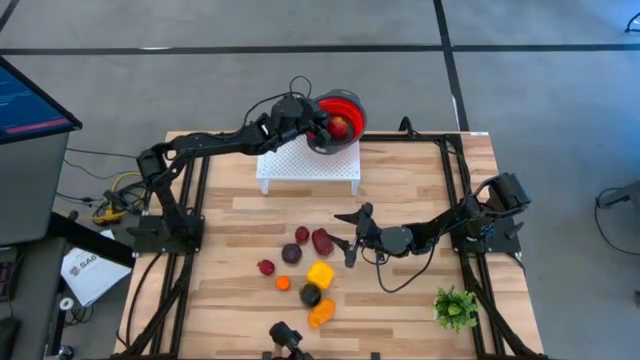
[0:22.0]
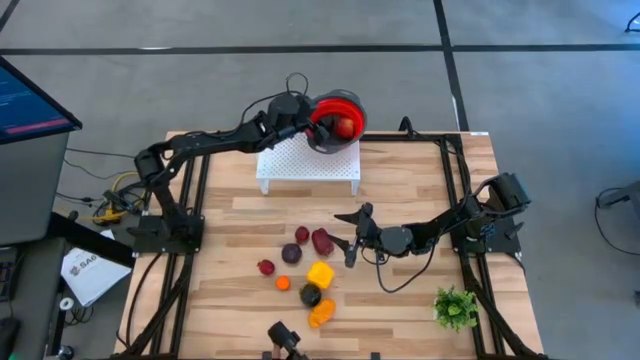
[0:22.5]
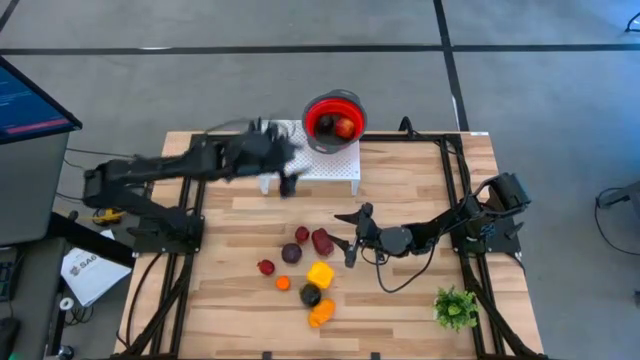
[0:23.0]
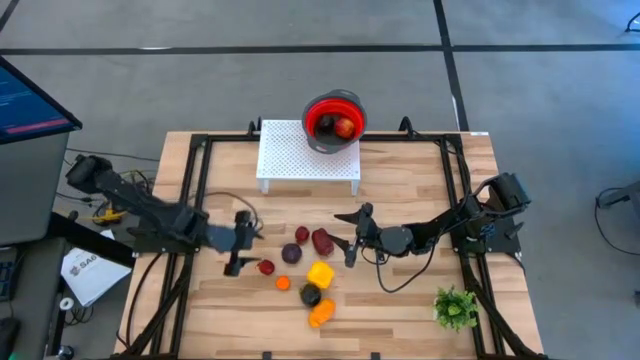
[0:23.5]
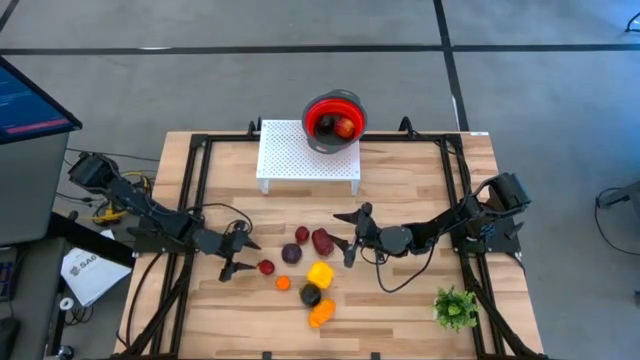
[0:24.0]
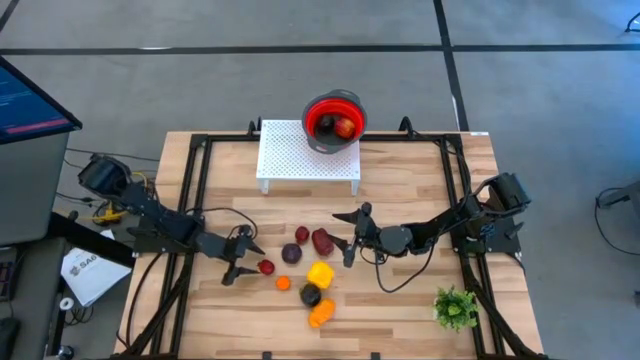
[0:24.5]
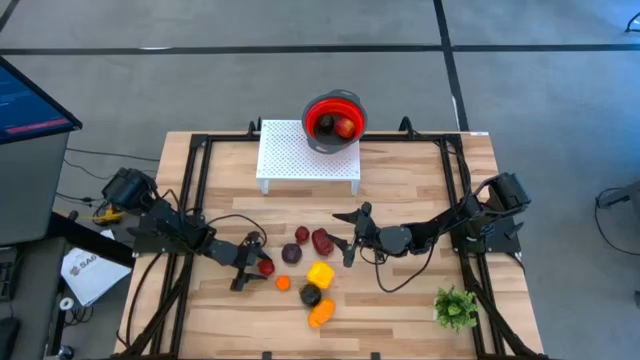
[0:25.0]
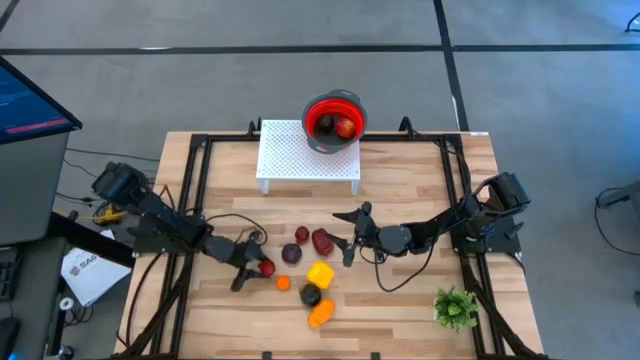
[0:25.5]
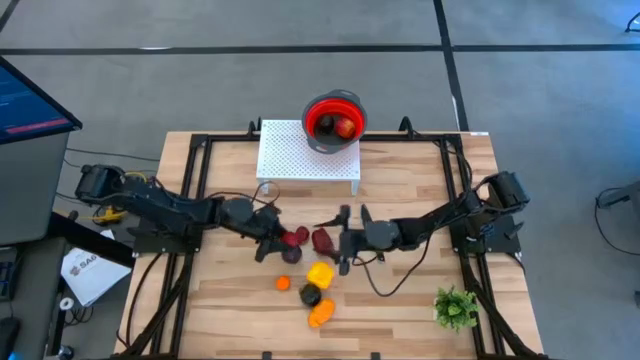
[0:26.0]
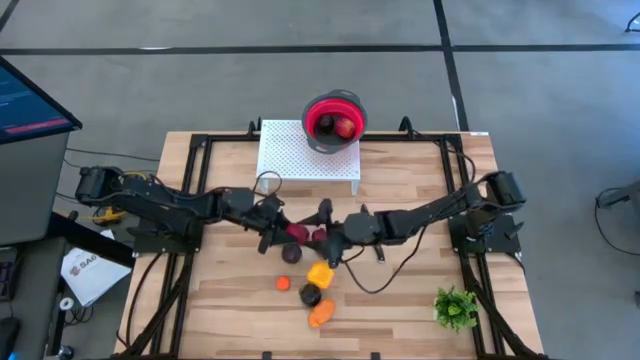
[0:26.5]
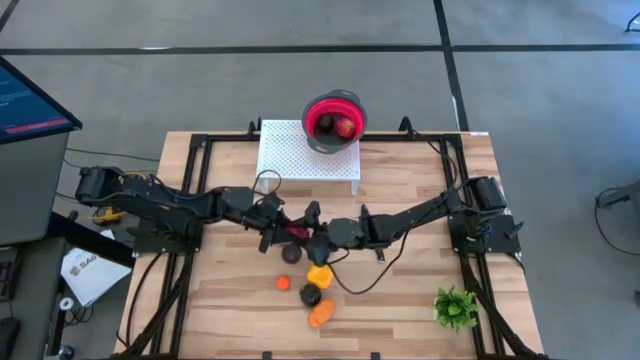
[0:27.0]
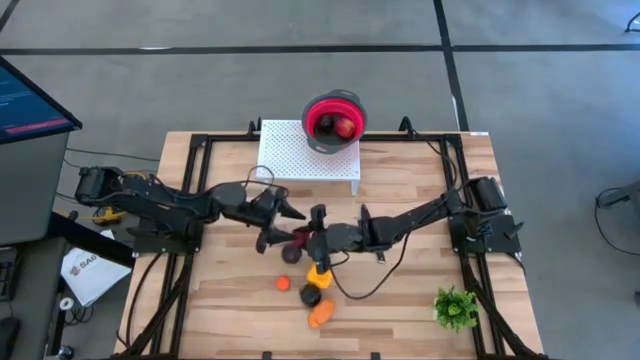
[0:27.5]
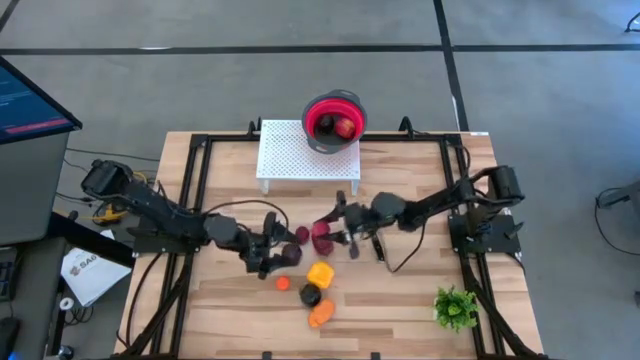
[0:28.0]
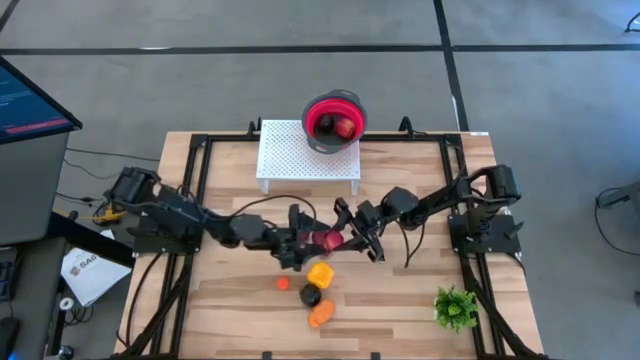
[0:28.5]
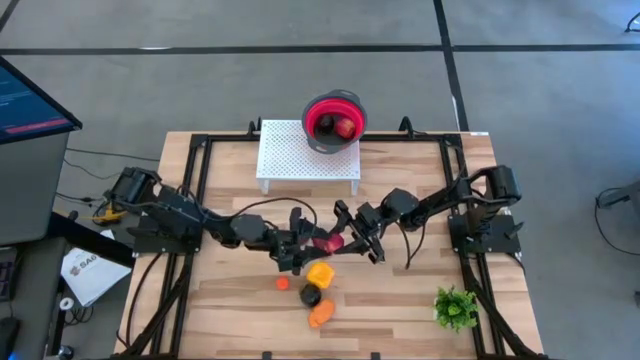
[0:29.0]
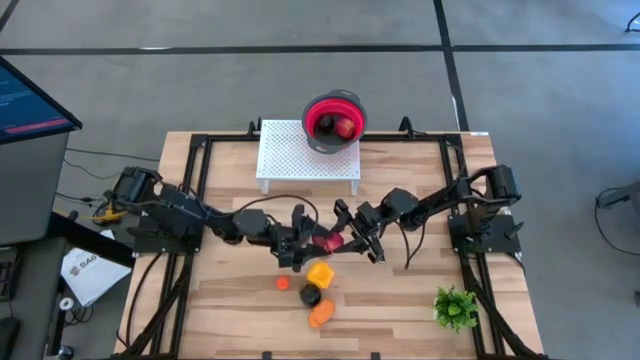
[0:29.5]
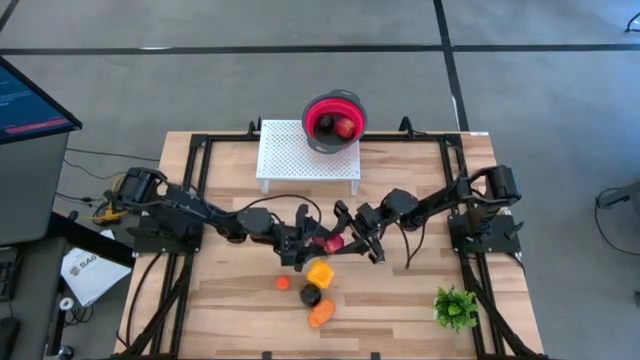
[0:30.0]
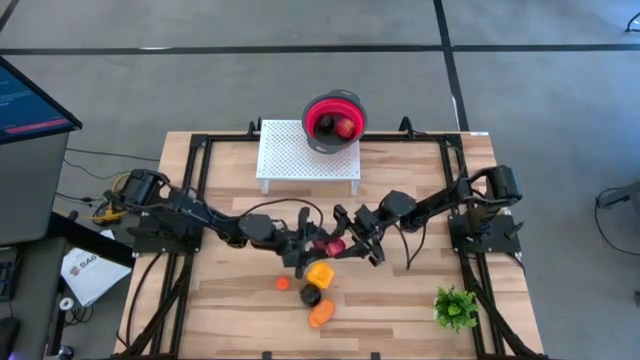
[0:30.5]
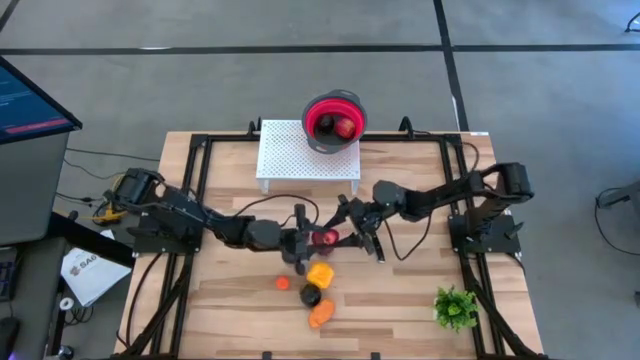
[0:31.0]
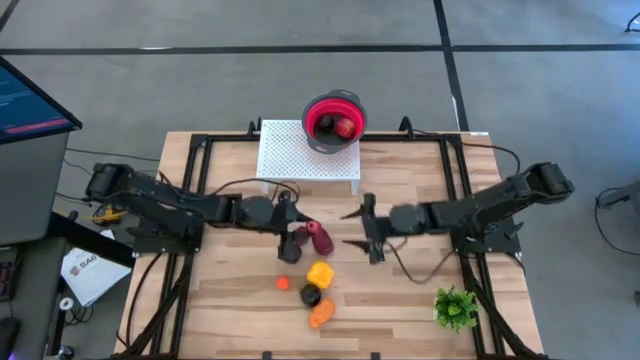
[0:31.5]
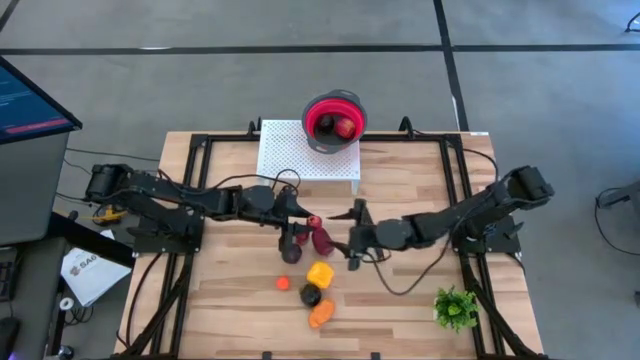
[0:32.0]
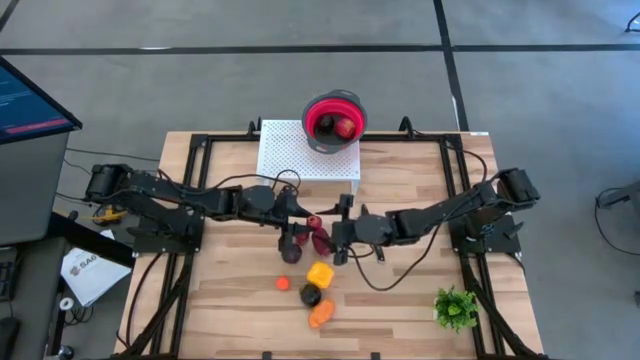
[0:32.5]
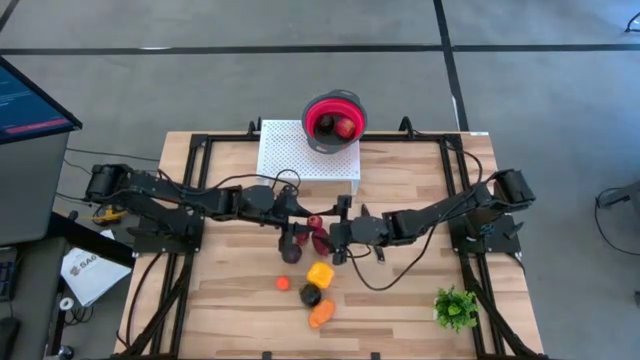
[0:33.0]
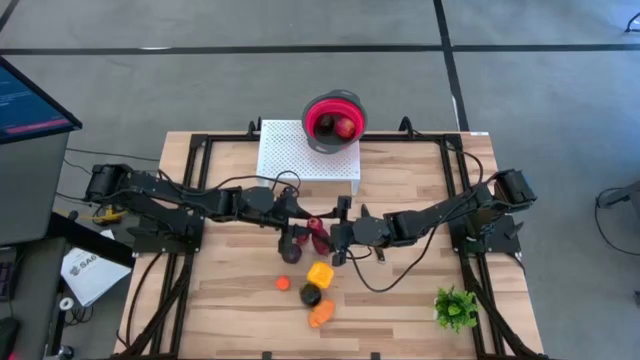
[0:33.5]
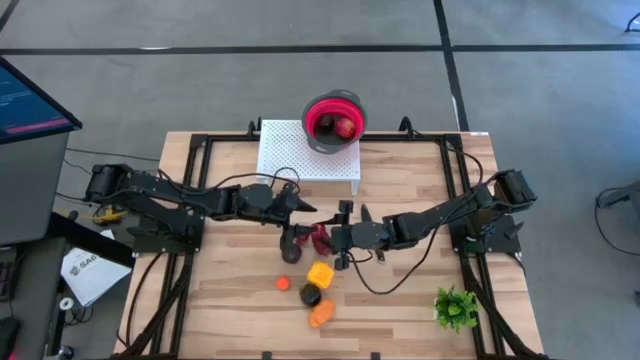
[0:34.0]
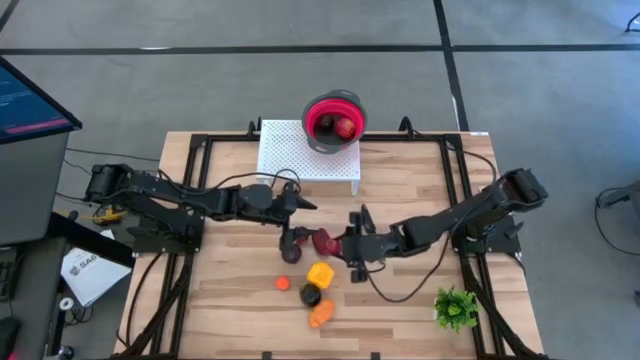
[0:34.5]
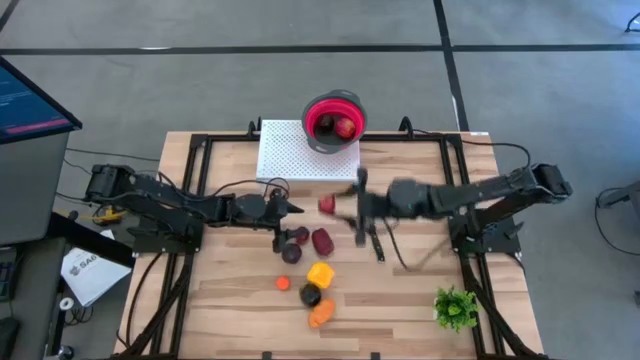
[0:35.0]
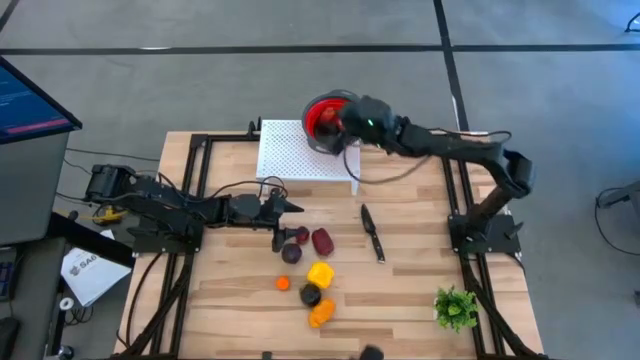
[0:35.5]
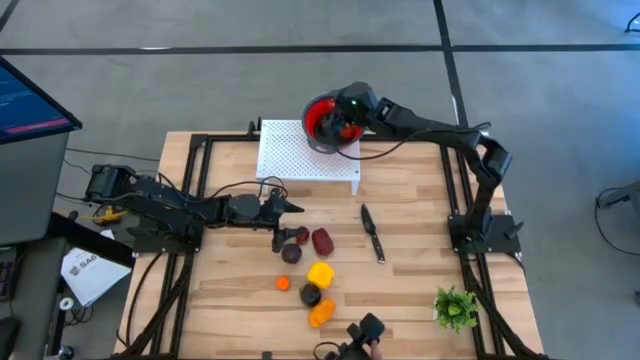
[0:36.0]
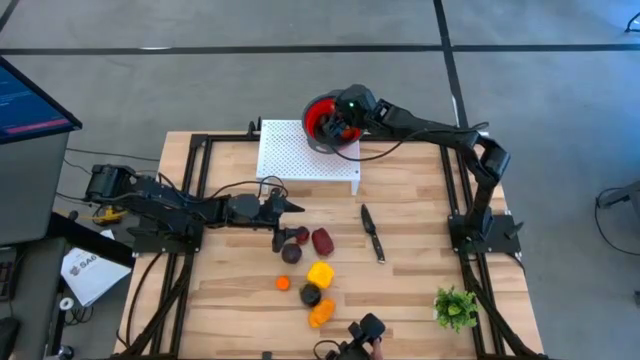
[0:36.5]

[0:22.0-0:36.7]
Task: Pick & Place Fruit
Put the bottom red pomegranate into the strainer bowl on the shelf

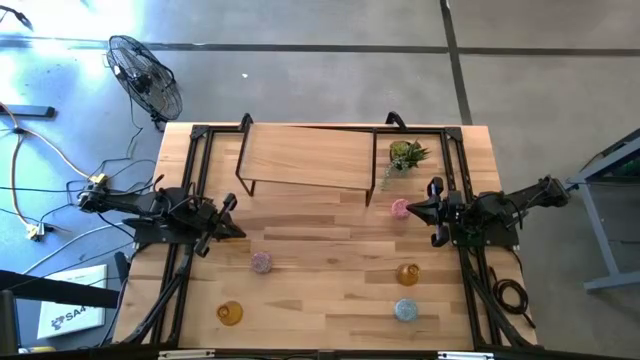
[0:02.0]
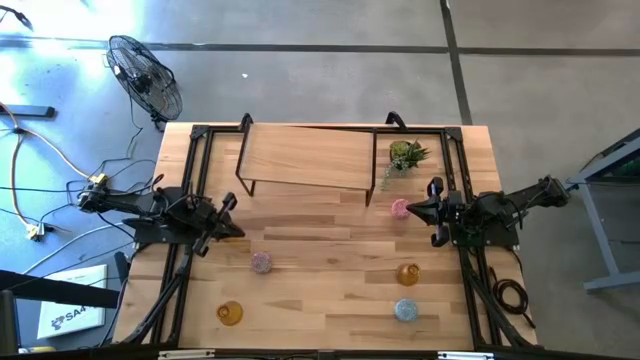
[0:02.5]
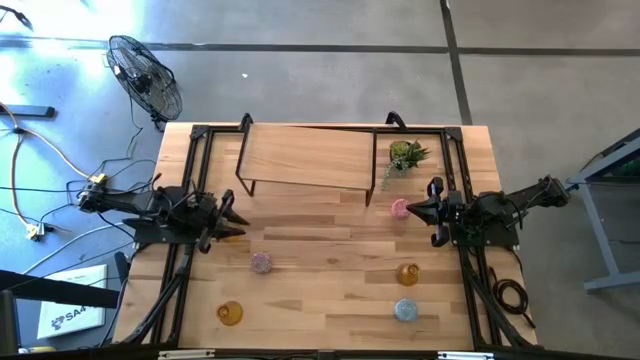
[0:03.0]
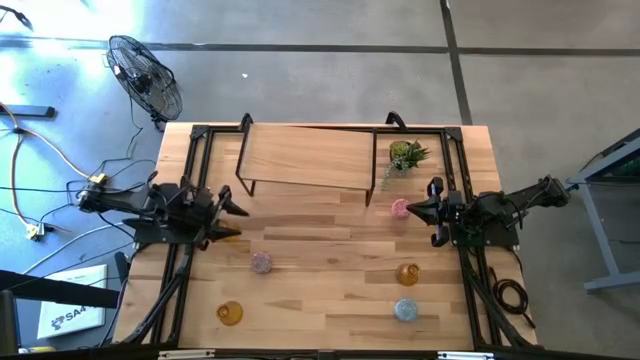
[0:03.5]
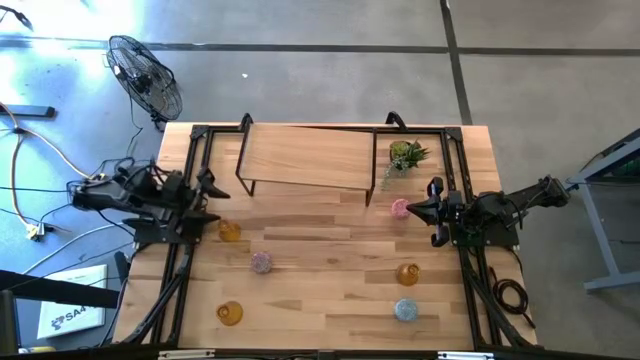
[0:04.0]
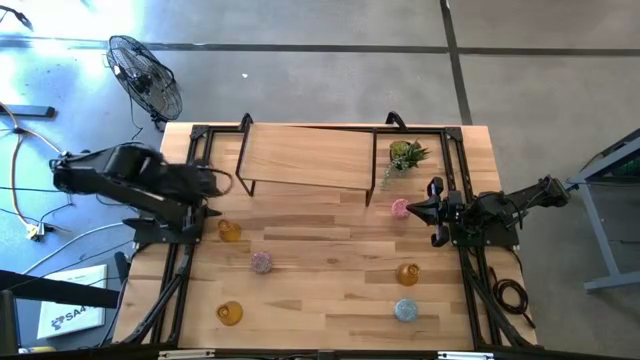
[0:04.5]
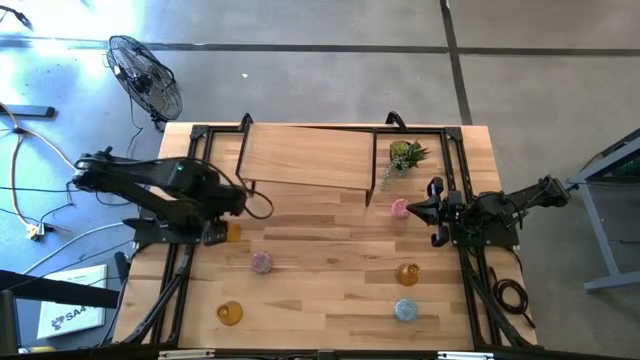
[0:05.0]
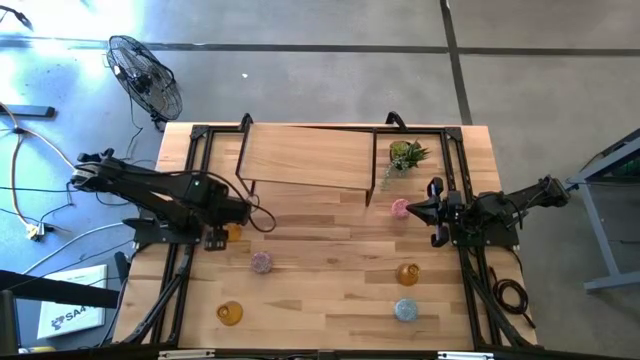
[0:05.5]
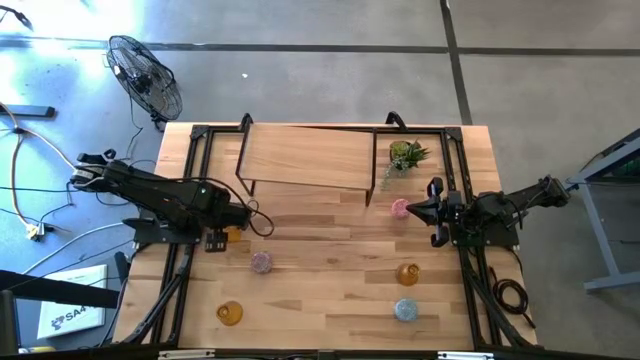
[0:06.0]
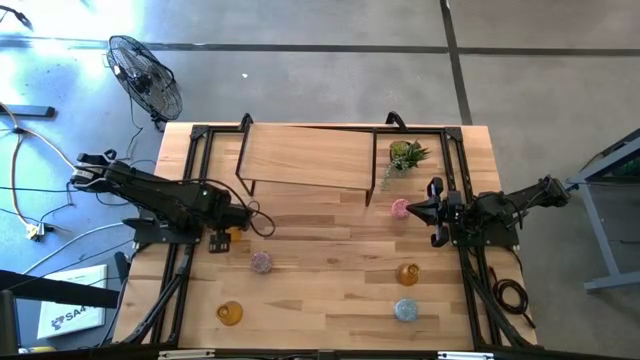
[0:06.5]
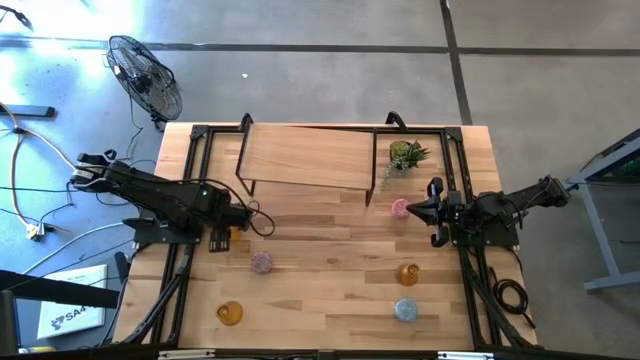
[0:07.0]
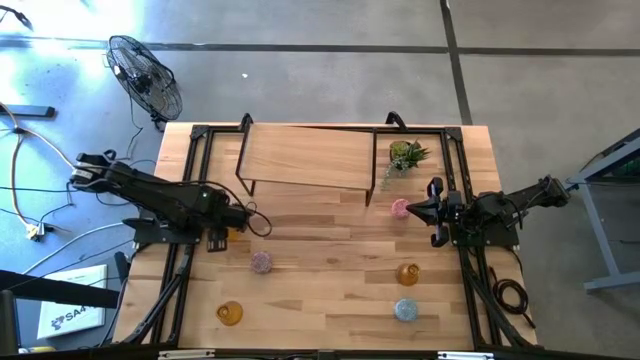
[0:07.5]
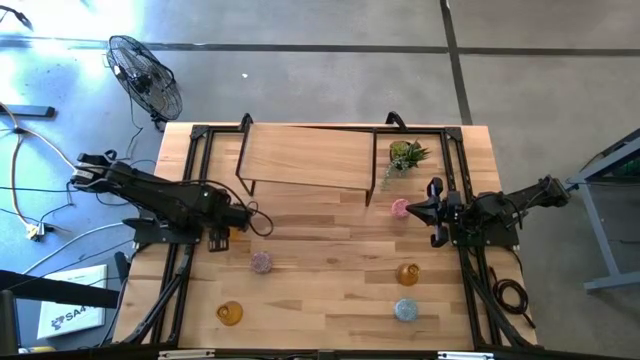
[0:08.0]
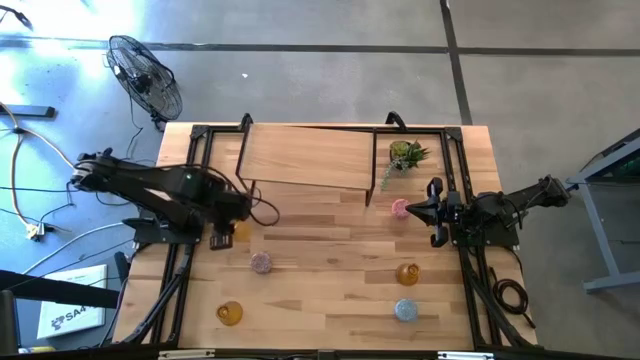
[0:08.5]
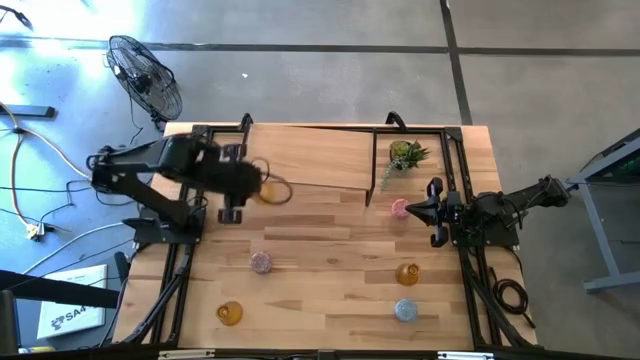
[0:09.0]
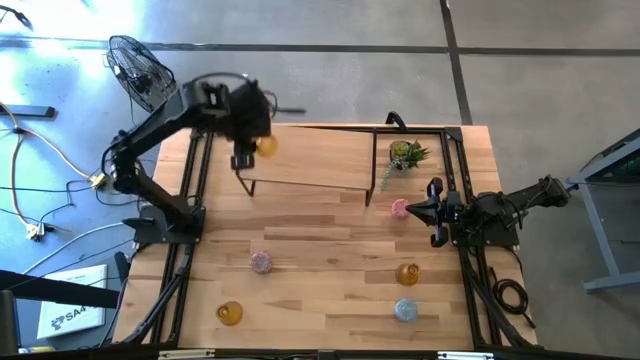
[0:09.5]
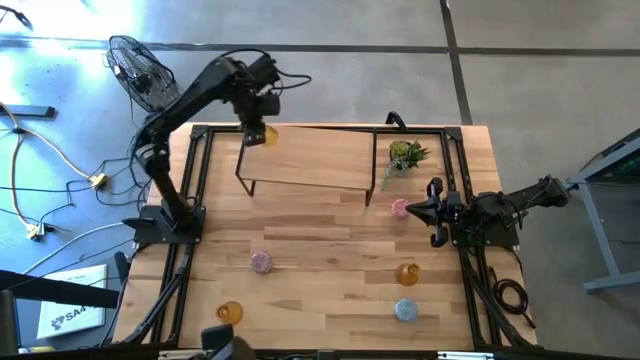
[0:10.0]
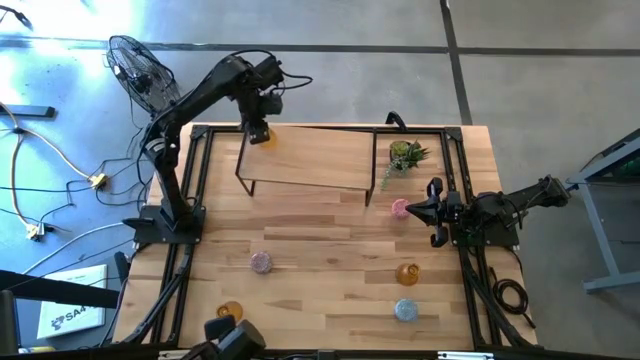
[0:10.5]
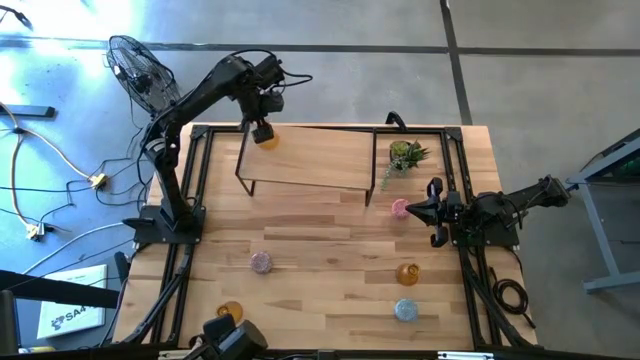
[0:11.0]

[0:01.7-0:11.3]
Task: Pick & Place candle stick holders
Put the top left yellow glass candle holder on the shelf
